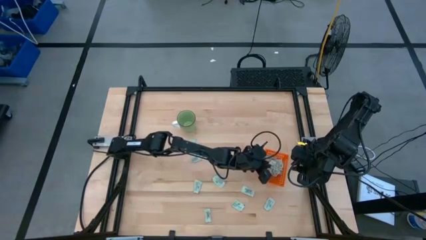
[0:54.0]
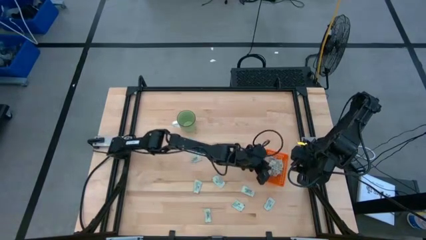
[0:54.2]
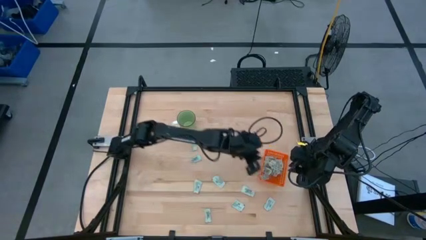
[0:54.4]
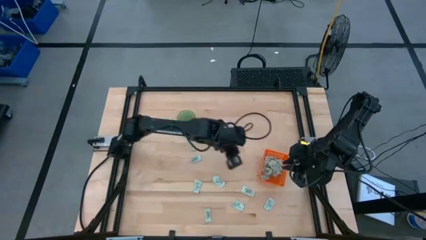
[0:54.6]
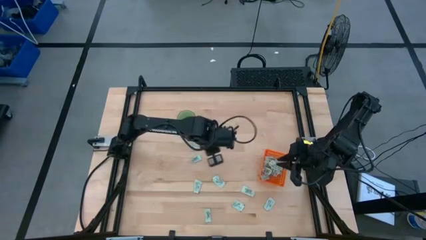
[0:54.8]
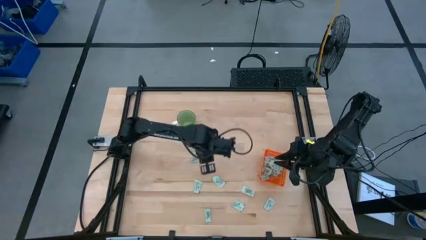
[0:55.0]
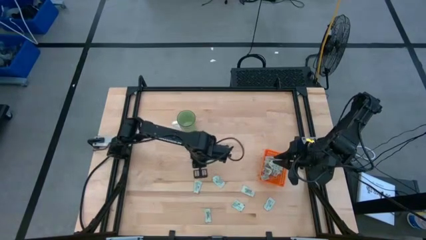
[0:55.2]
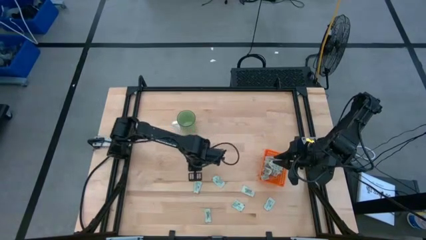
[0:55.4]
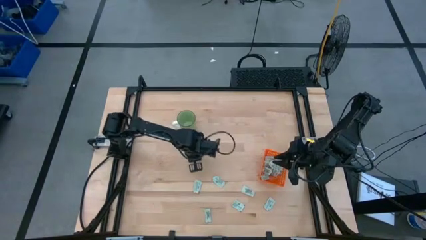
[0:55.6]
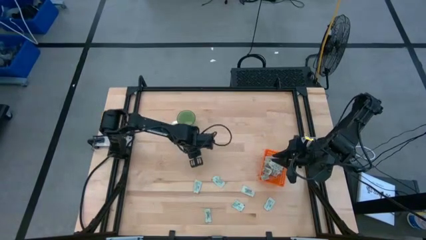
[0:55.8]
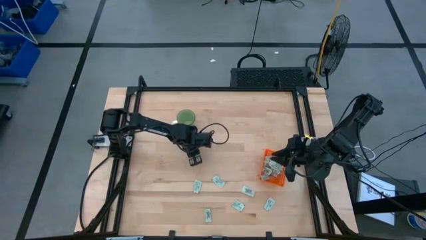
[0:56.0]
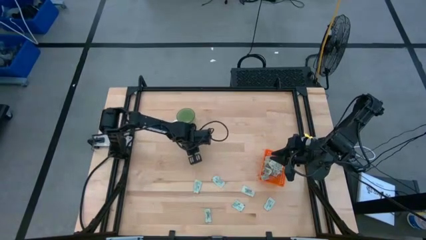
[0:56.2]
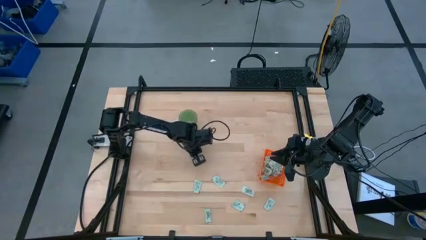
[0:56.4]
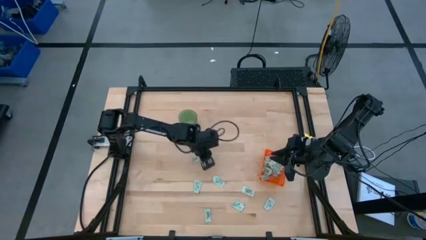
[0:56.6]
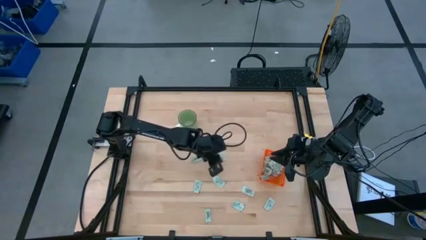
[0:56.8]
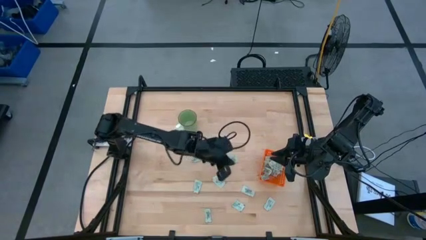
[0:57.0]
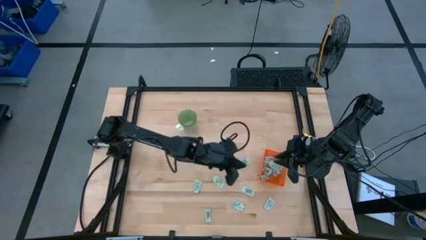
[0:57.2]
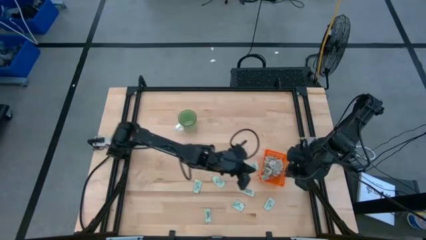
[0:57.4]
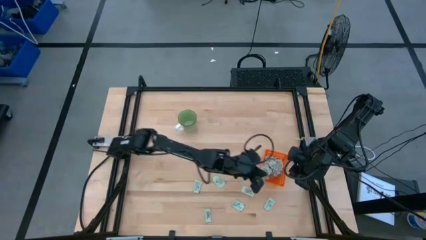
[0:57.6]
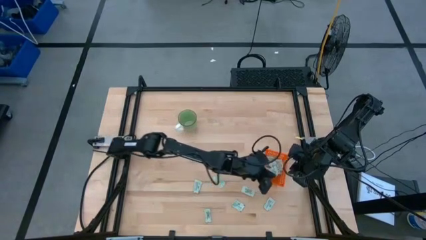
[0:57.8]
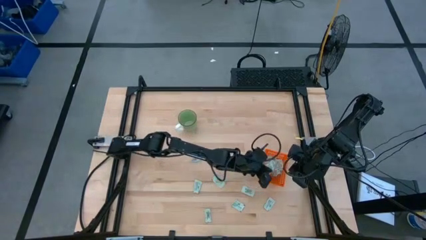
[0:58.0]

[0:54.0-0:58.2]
Task: Pick and place Stevia / Truvia into bins
Put the stevia packet into the orange basket

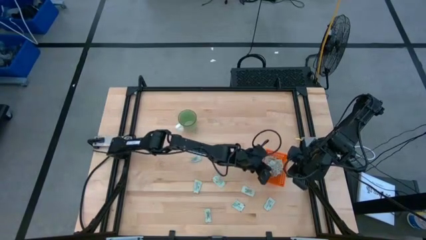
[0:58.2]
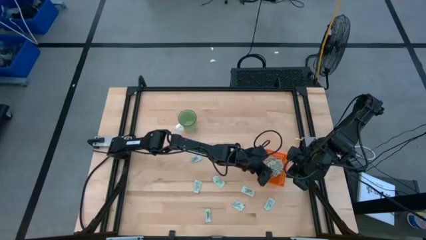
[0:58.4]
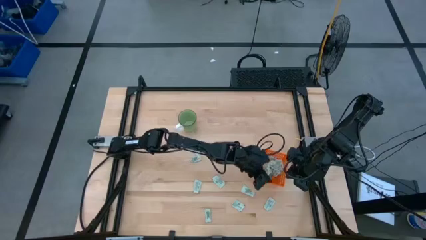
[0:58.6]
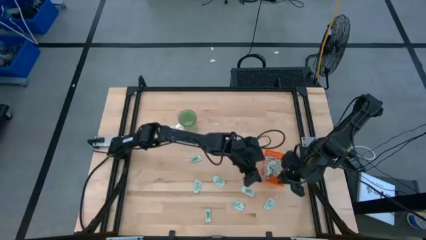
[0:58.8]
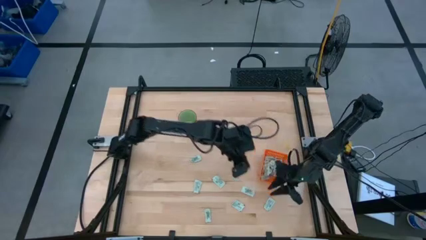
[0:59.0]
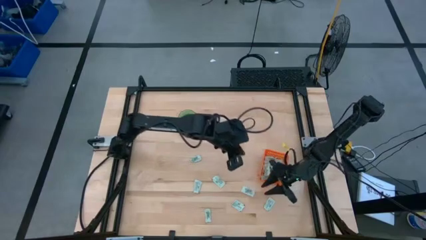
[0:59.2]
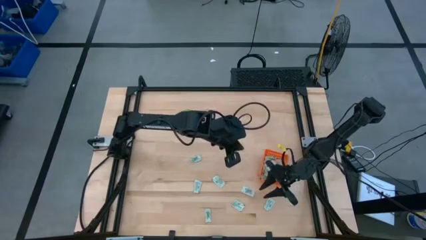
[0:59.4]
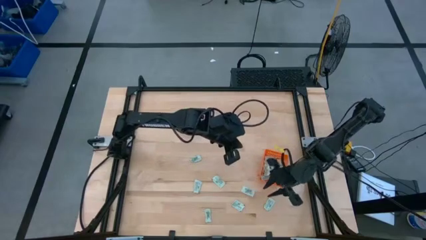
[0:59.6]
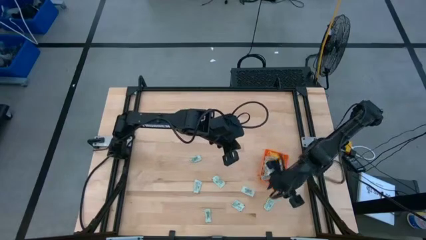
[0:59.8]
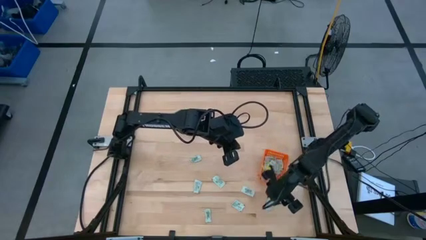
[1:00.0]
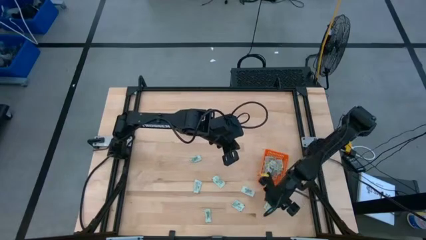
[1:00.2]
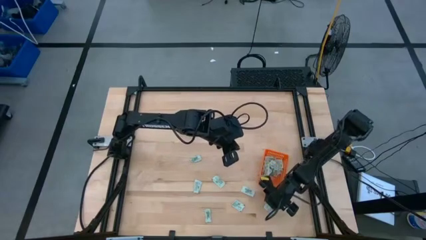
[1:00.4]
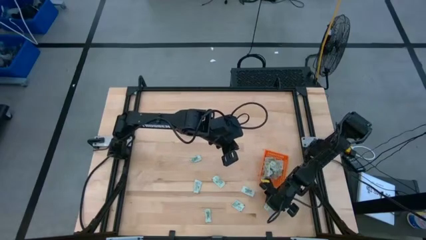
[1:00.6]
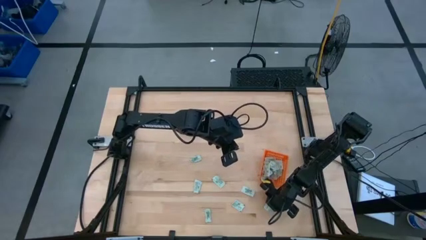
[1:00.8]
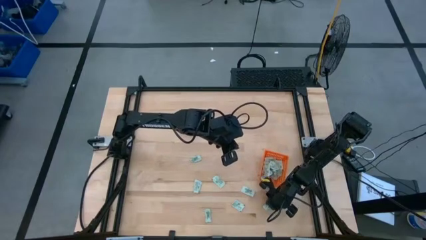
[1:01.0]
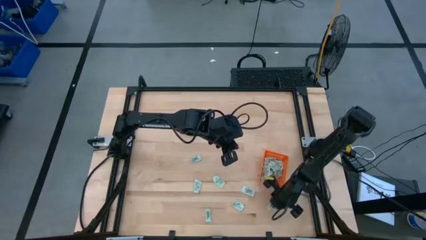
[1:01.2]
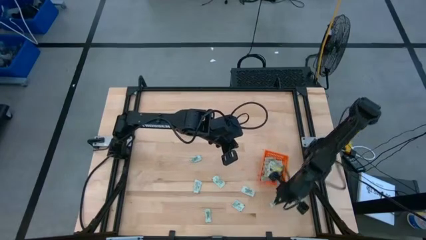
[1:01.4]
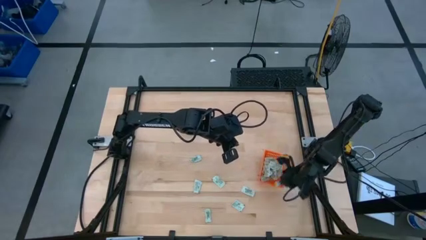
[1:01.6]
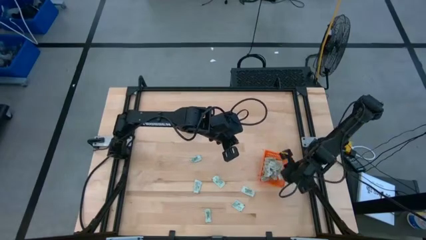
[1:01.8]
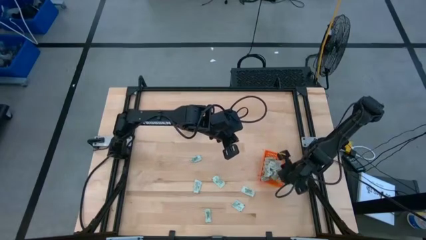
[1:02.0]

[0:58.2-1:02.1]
Put the stevia packet into the orange basket

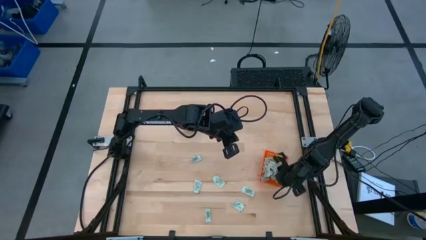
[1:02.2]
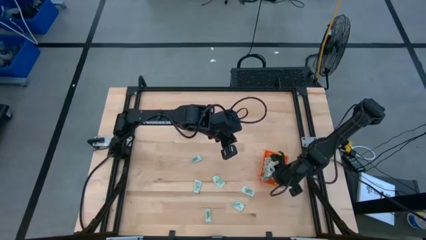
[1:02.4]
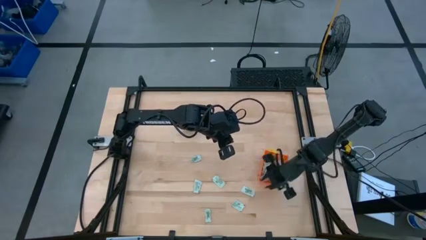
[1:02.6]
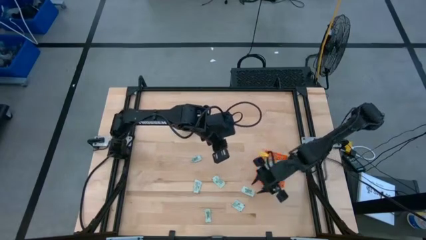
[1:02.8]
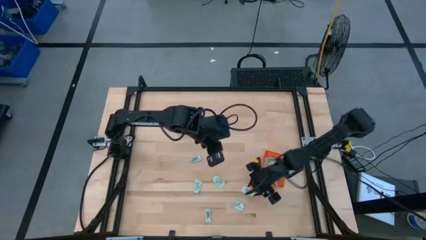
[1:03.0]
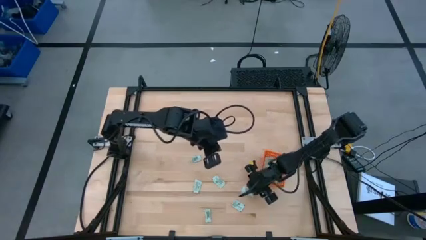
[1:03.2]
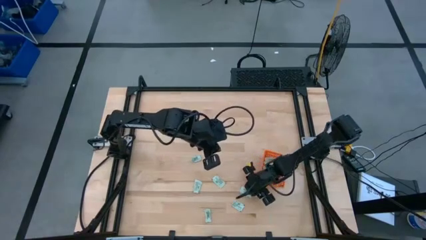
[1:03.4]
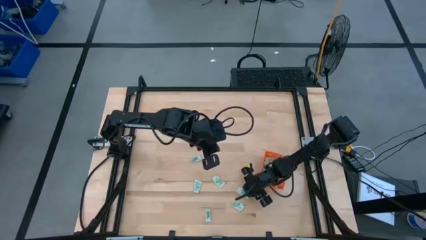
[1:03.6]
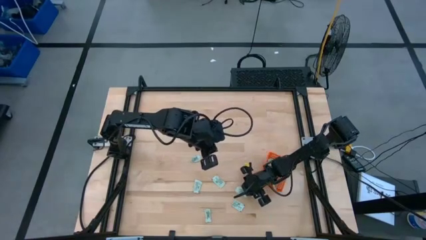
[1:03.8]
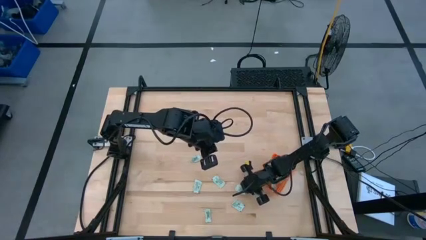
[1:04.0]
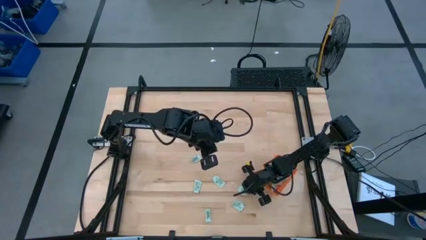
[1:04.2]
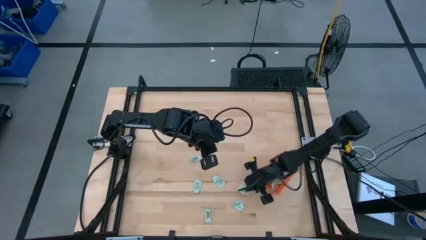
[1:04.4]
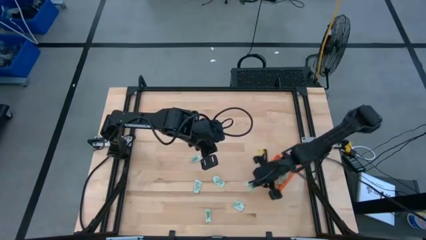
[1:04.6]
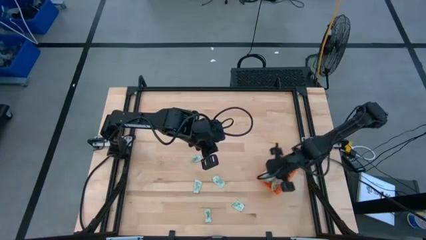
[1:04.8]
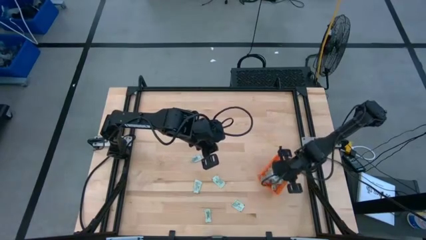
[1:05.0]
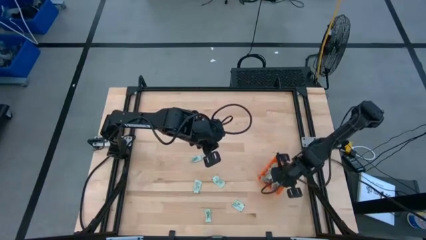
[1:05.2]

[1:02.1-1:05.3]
Put the stevia packet into the orange basket

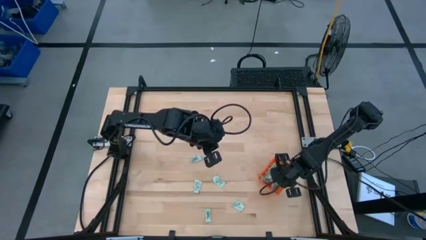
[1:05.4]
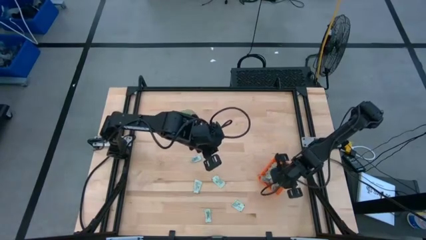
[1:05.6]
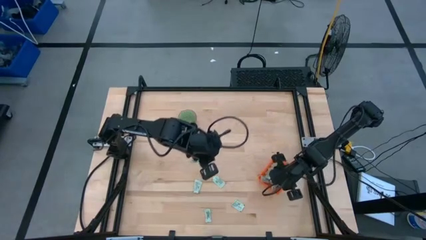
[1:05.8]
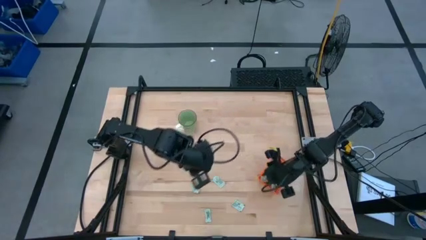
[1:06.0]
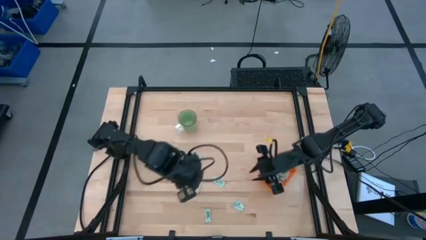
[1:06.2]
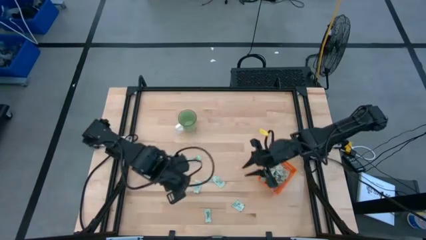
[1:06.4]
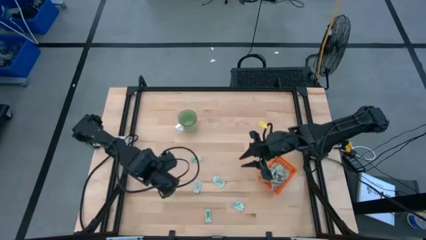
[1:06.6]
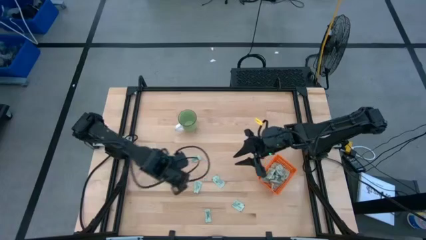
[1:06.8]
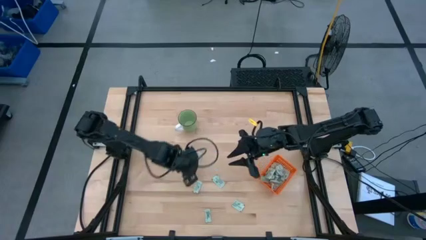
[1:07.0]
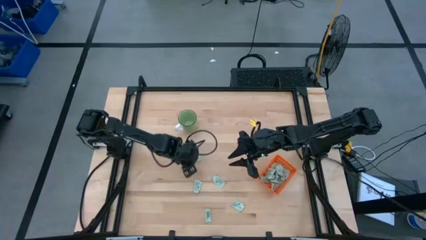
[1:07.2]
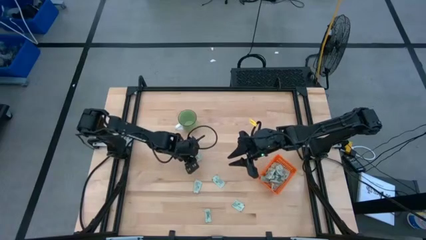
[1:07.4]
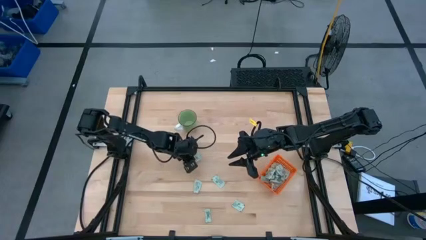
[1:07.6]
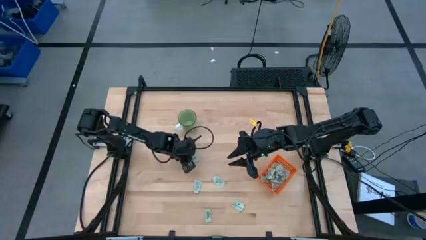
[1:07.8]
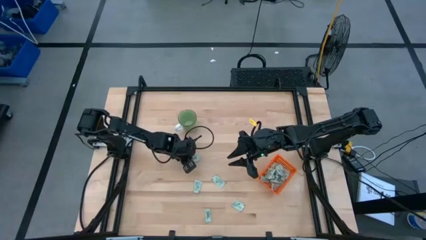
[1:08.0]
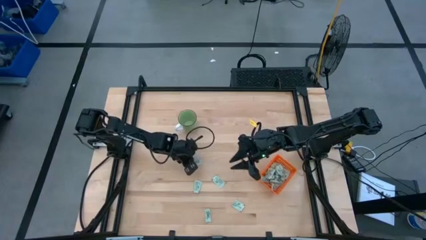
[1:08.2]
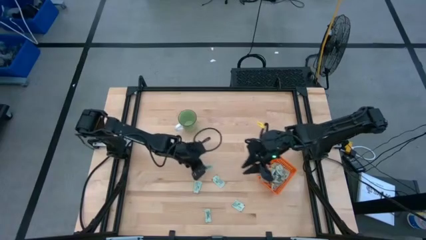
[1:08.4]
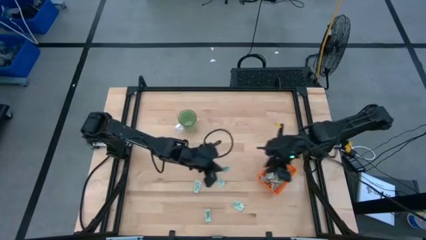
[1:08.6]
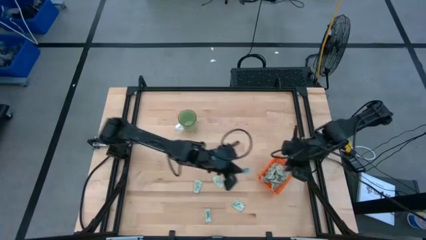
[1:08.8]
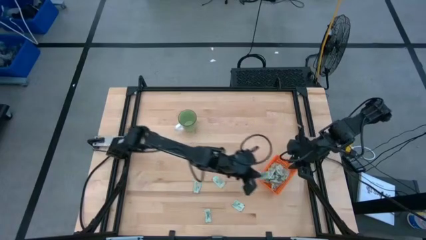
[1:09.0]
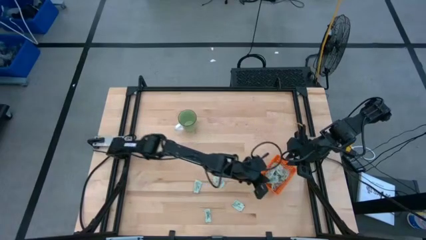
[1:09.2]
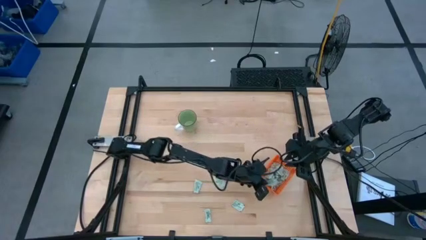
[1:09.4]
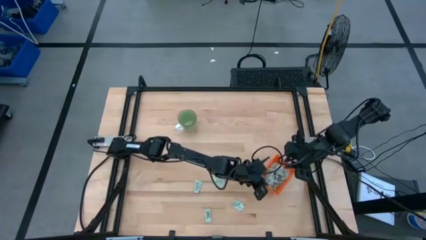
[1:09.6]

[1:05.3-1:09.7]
Put the stevia packet into the orange basket

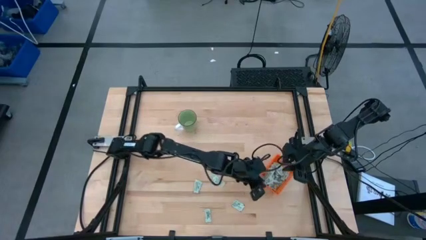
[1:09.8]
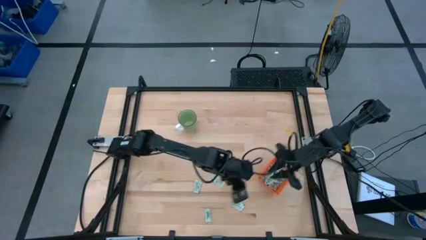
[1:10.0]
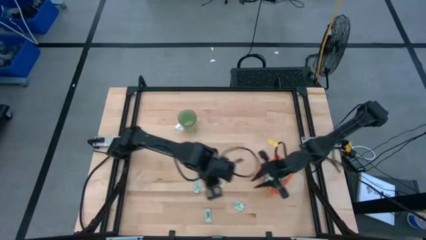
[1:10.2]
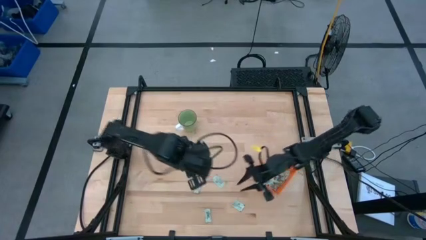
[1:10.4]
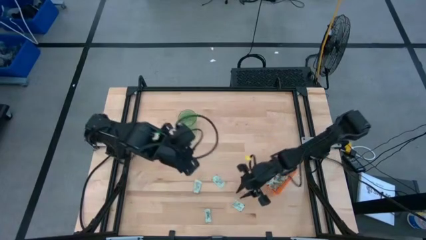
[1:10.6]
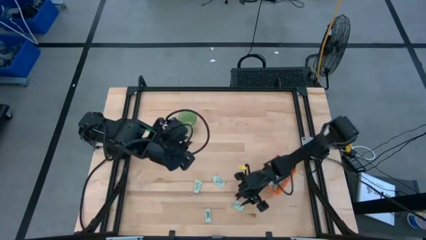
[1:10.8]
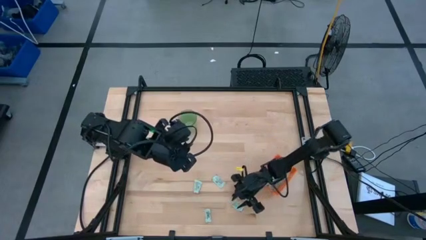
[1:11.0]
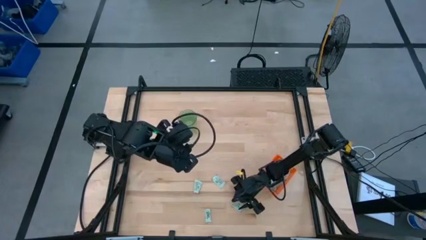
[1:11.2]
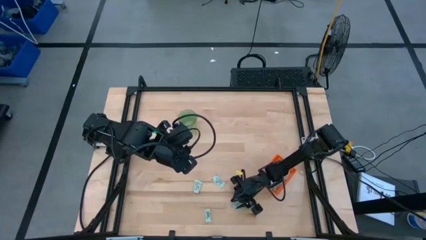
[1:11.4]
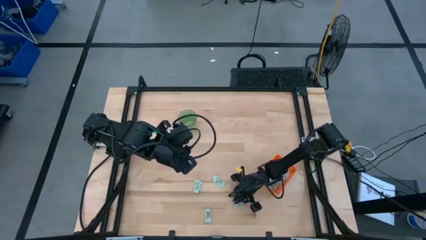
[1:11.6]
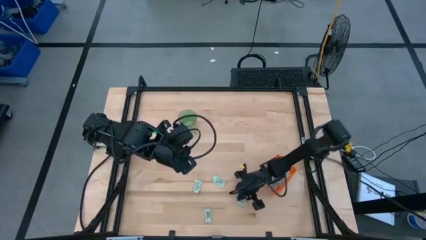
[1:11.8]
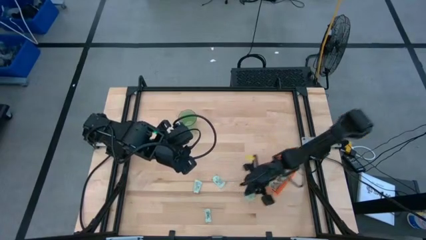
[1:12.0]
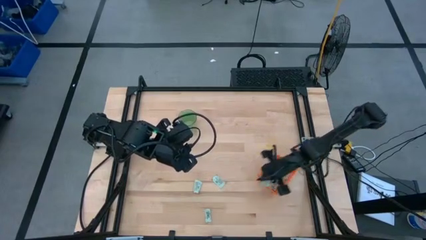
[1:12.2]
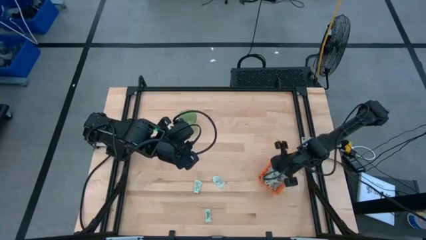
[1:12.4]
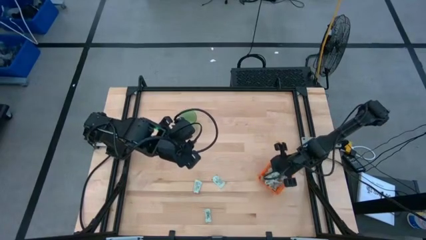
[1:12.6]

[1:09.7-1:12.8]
Put the stevia packet into the orange basket
